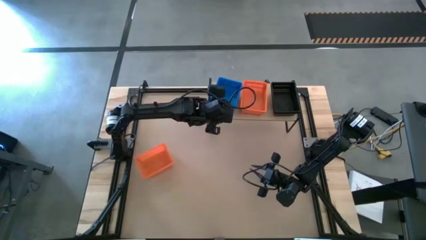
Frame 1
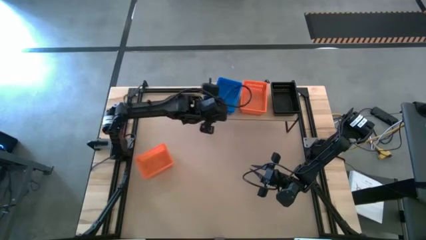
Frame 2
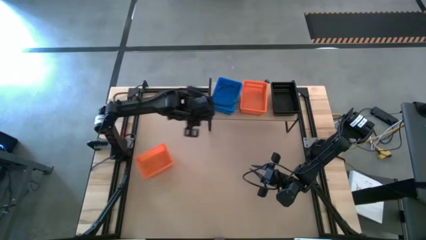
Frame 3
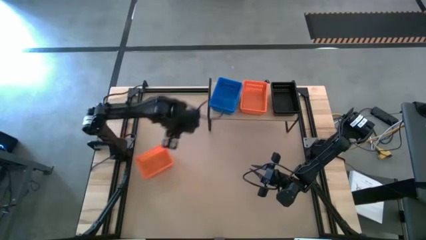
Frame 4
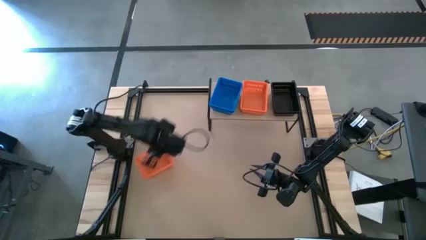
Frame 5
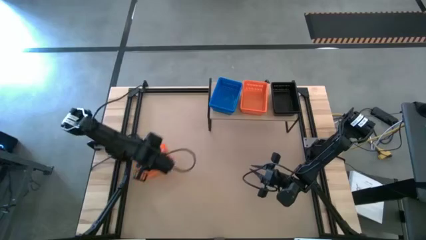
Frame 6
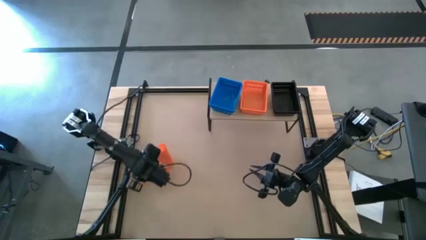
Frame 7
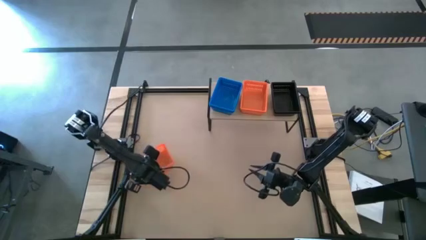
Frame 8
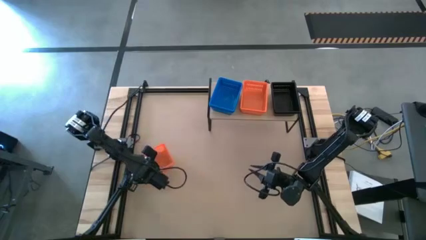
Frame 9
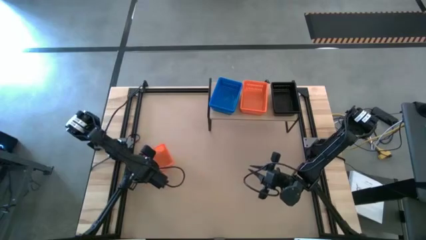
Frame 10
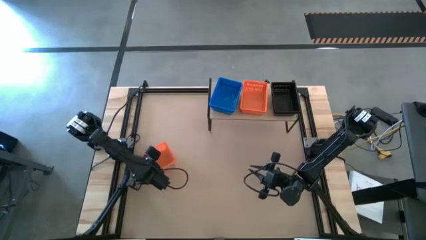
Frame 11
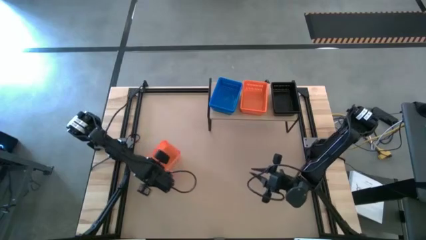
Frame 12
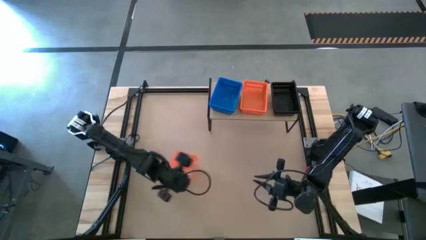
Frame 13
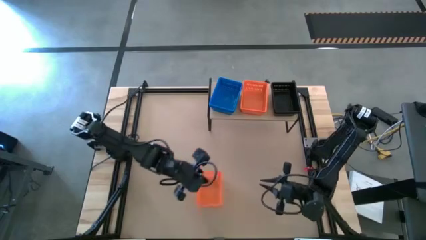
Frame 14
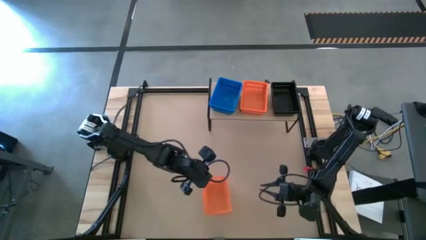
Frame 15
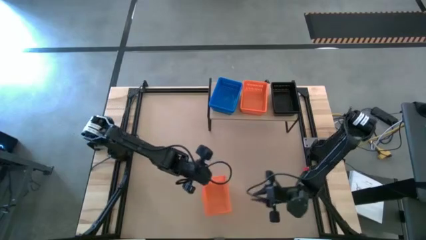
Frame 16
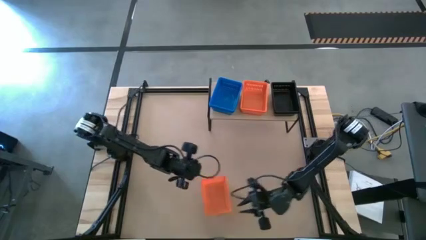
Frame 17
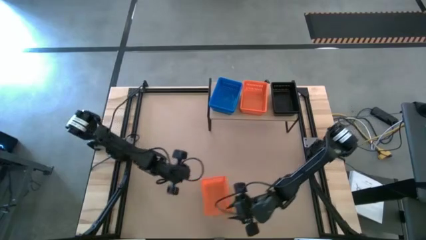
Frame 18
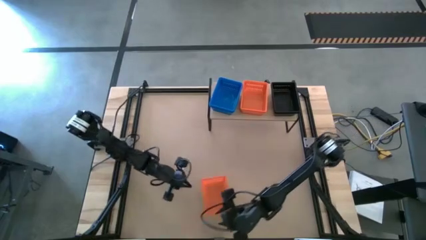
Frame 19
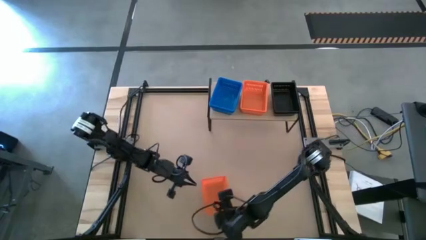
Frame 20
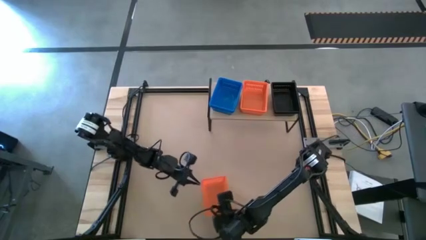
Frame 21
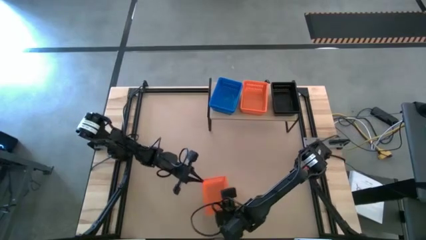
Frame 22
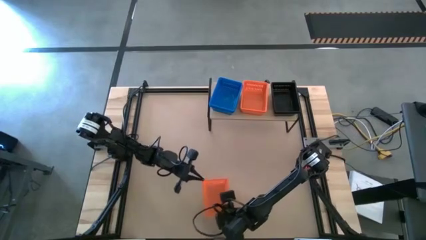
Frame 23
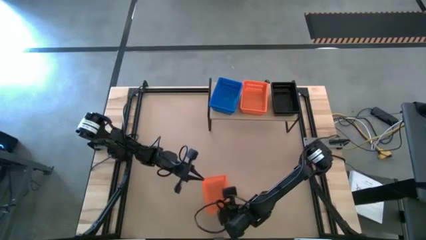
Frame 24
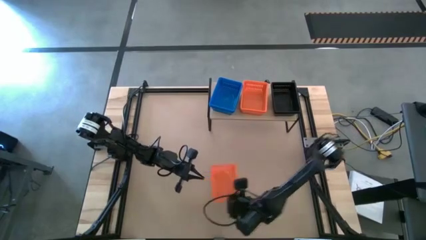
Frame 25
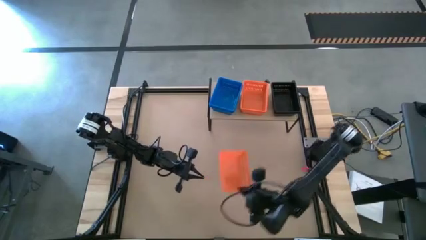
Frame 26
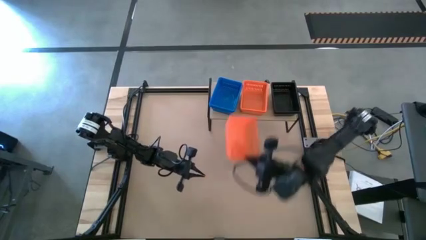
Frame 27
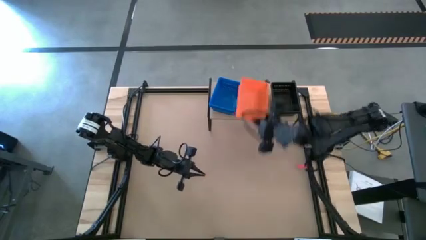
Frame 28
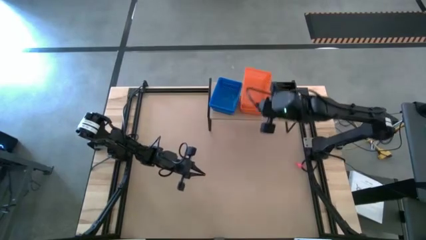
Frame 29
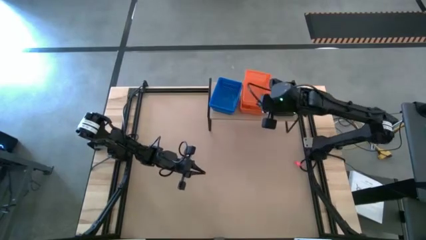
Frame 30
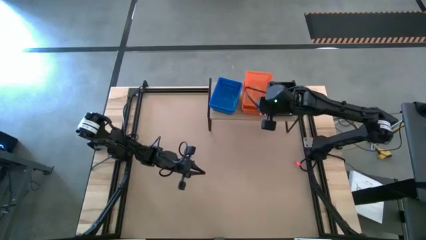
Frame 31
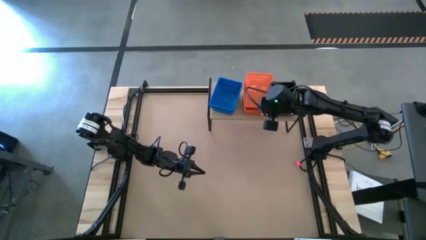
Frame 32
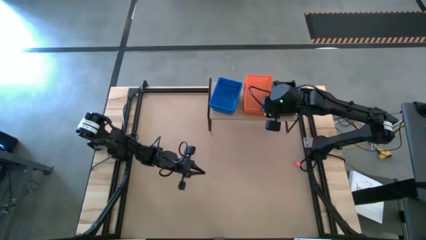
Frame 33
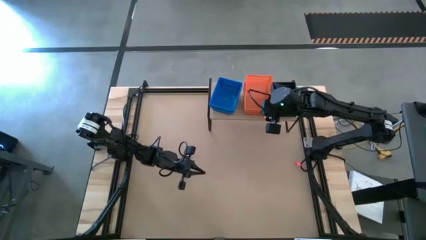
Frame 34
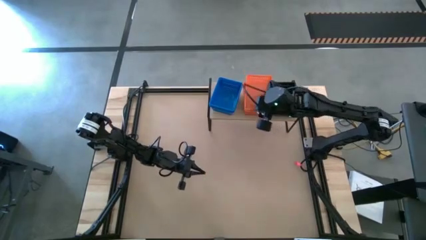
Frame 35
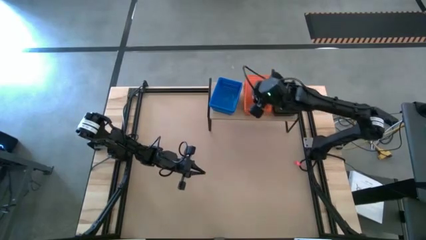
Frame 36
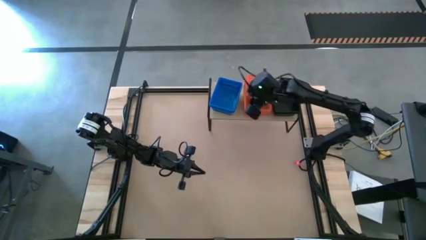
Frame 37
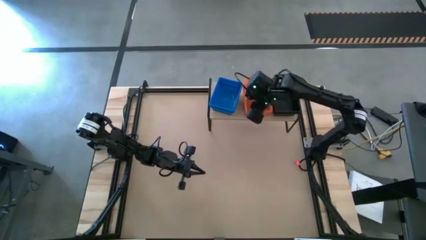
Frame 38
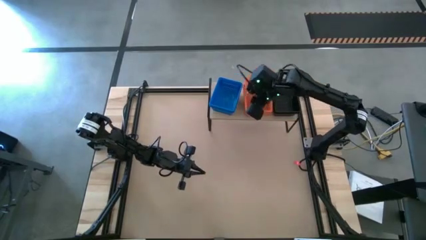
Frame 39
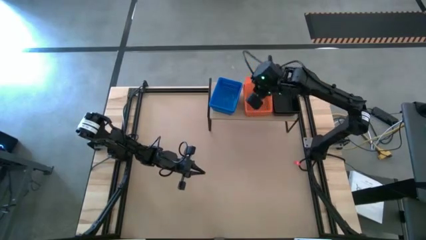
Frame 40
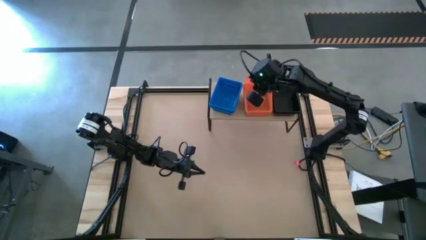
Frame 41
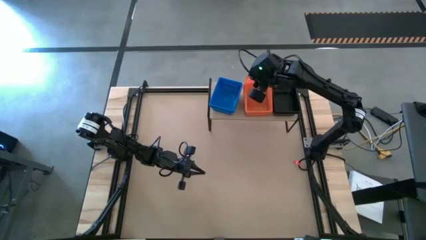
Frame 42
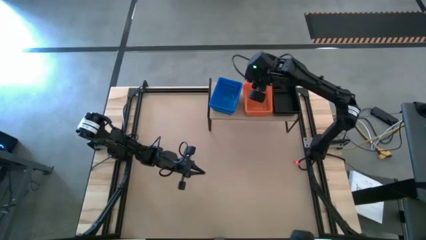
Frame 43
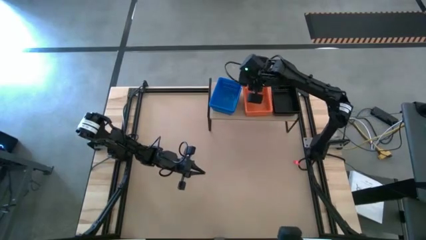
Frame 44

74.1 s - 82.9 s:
Task: Stack baskets on shelf by color
Stack the orange bin on top of the other orange bin on the shelf

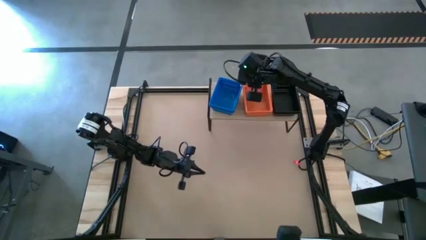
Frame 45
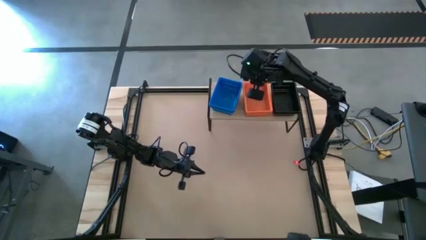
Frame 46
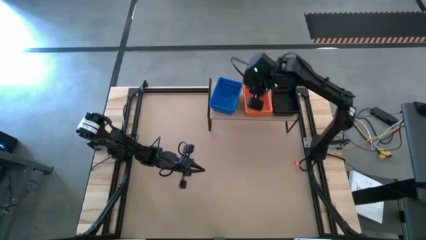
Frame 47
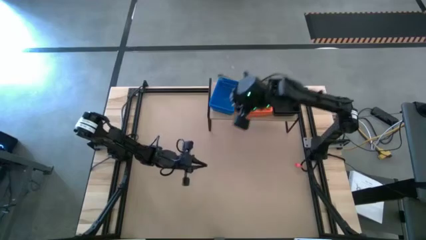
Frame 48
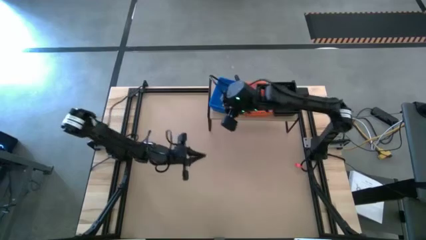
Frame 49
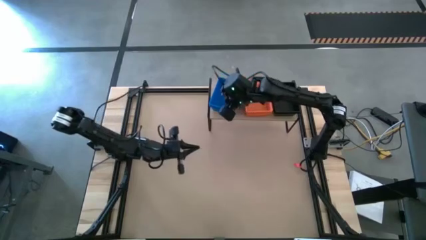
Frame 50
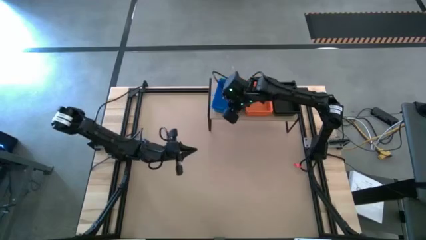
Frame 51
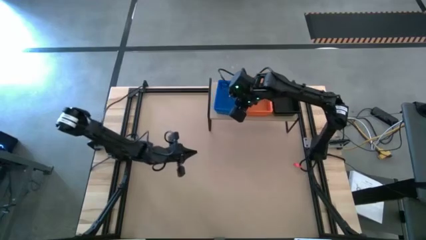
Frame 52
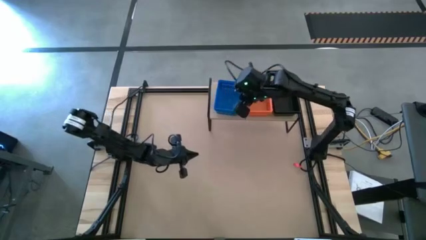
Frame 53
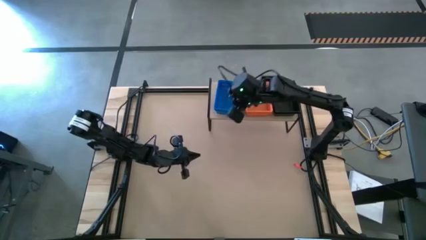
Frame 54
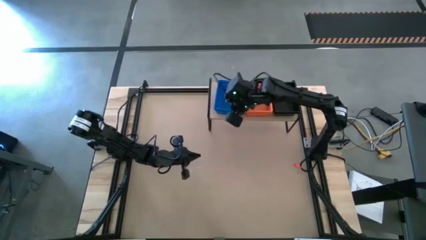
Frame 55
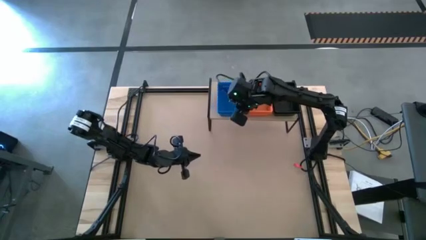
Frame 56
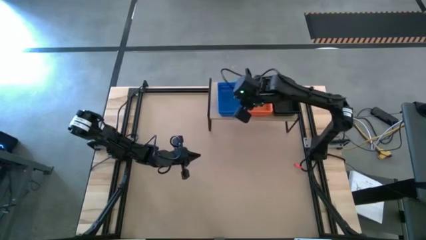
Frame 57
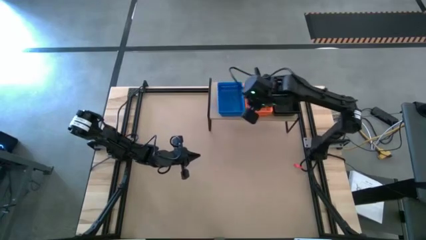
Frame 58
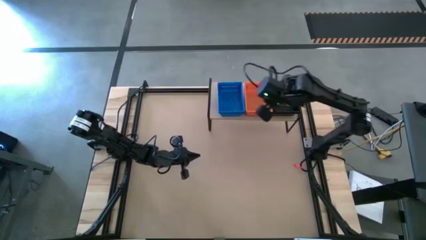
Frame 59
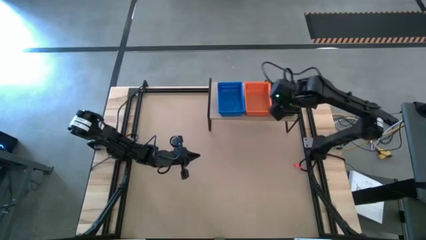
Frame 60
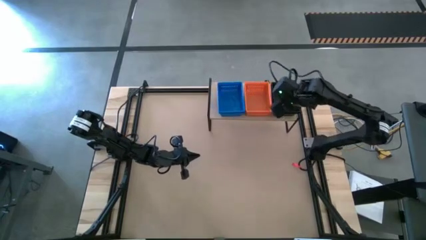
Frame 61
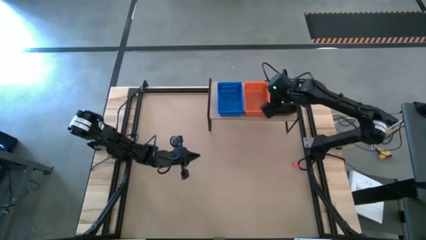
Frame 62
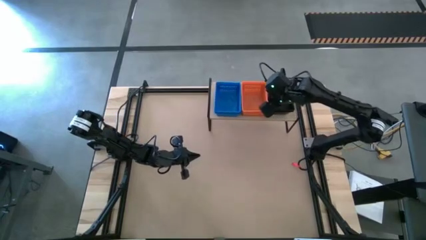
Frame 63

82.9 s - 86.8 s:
Adjust the bins on the shelf

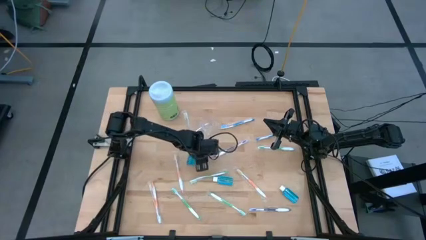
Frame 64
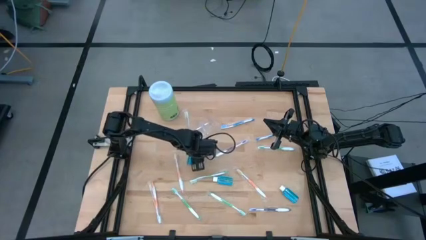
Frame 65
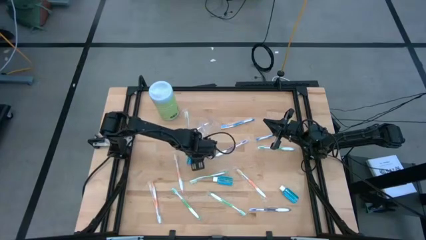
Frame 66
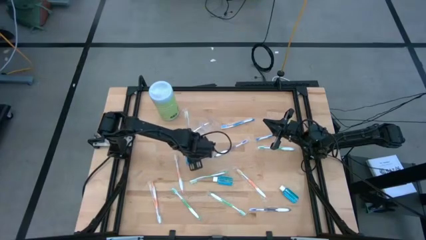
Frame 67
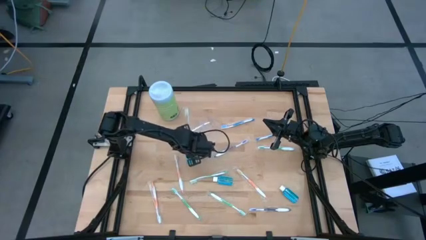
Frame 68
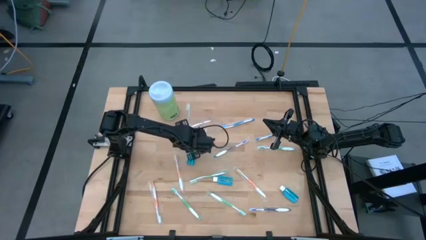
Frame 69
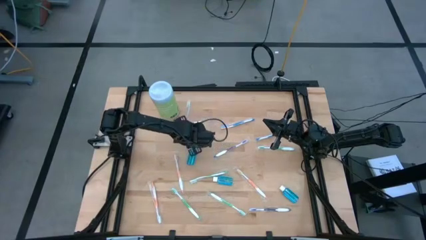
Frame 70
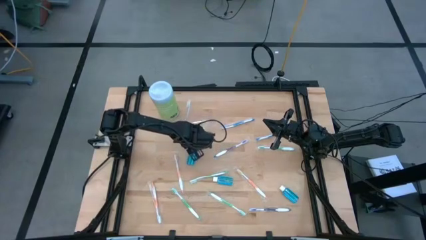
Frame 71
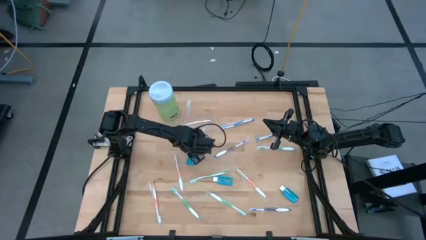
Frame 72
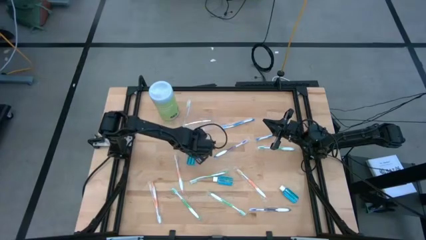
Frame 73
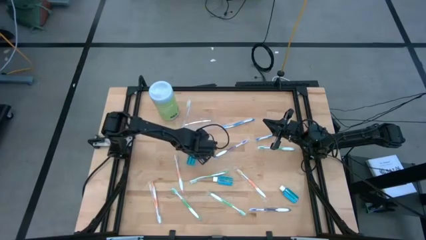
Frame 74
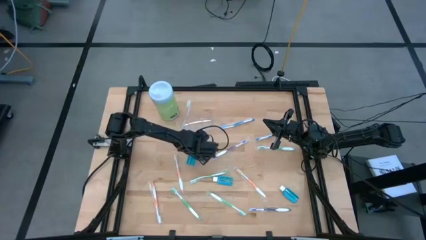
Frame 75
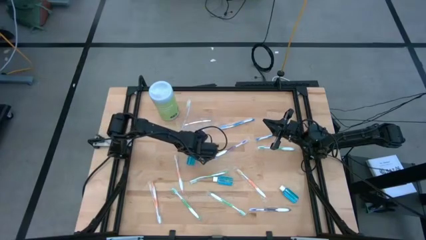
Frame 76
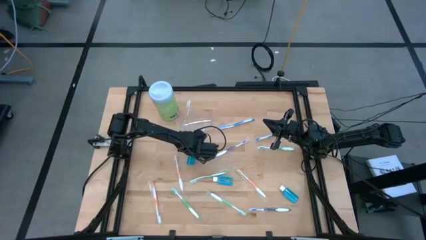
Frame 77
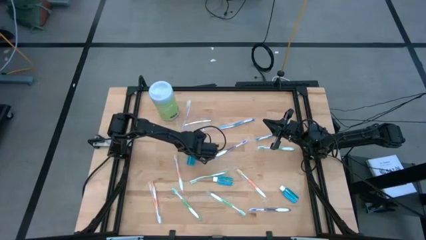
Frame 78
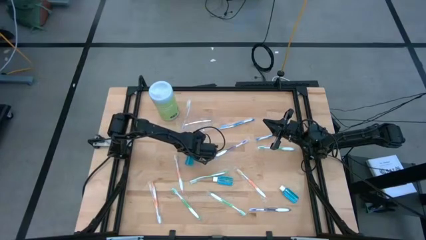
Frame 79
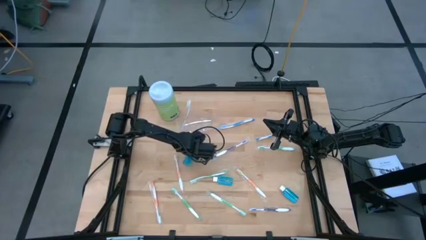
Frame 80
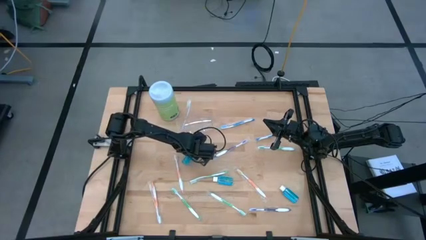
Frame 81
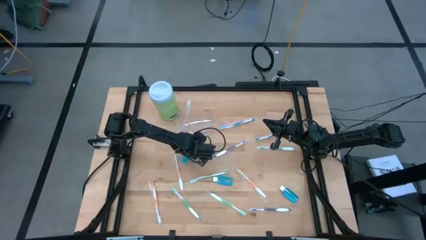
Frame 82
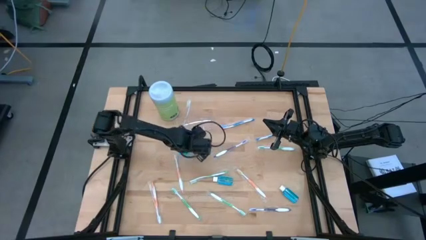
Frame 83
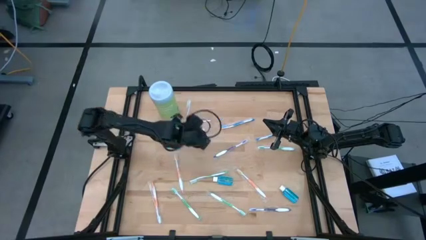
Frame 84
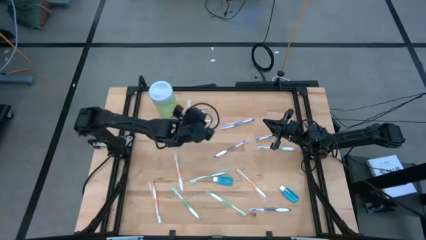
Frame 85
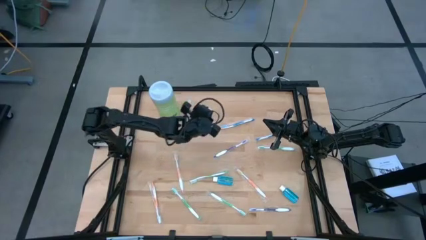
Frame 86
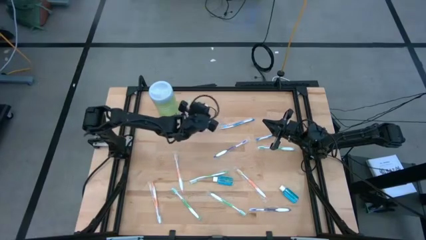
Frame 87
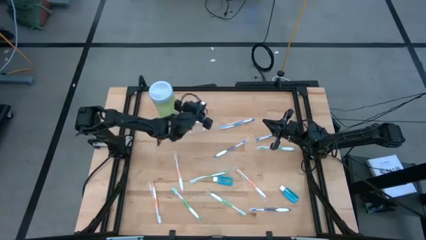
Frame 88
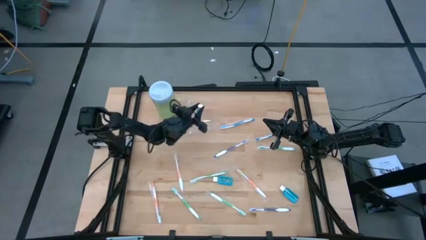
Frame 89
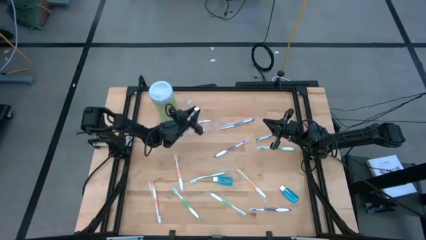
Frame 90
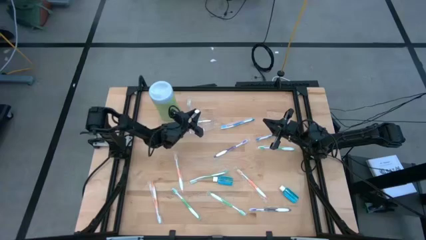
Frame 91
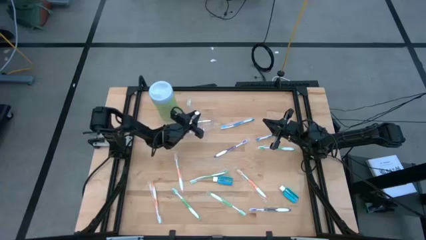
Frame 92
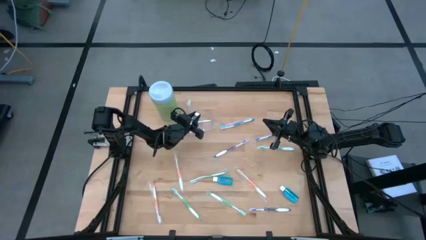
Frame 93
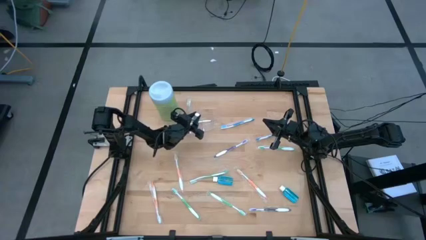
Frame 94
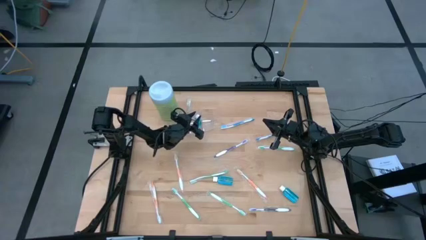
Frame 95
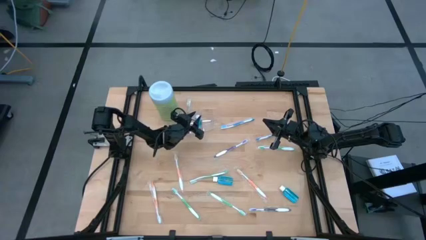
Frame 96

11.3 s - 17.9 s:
Task: Pick & Place toothbrushing station
Put the blue mouthwash into the transparent organizer
